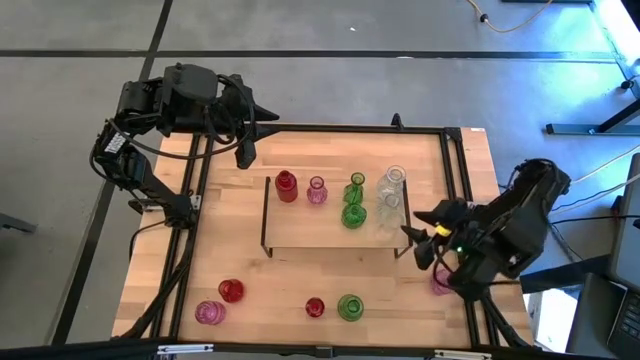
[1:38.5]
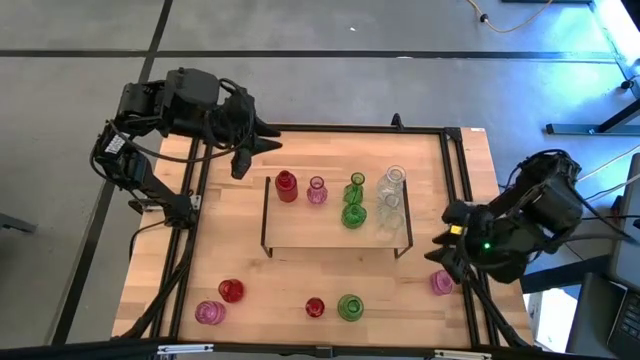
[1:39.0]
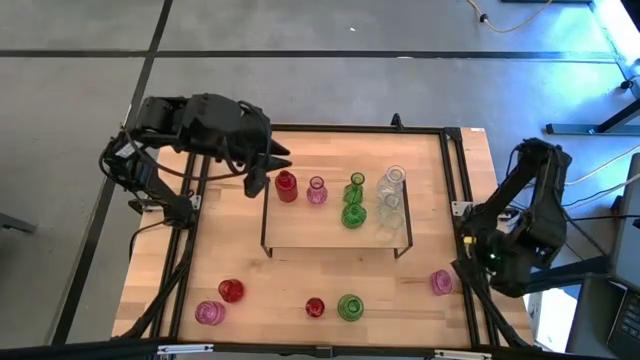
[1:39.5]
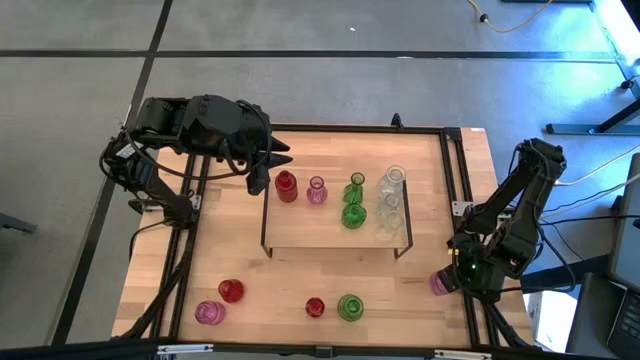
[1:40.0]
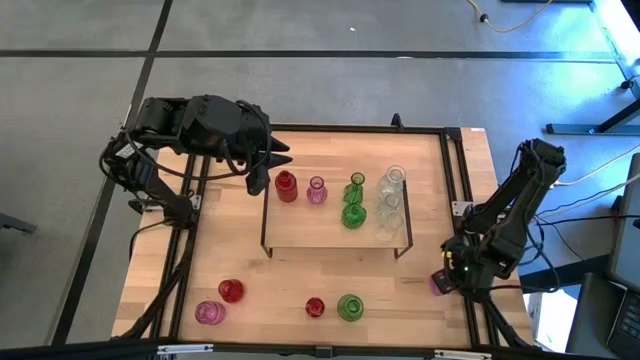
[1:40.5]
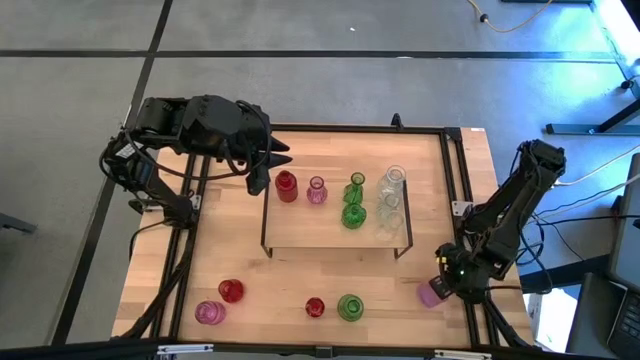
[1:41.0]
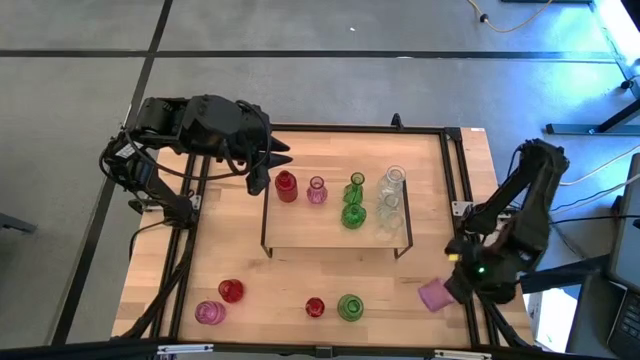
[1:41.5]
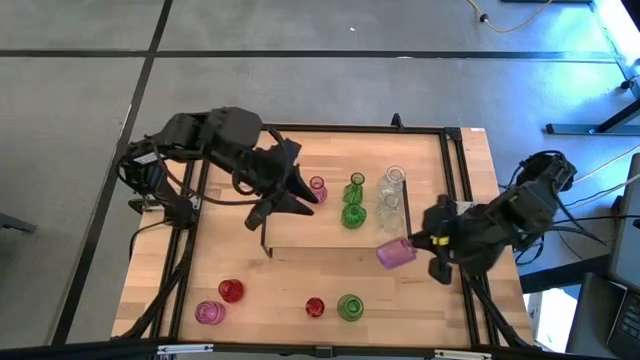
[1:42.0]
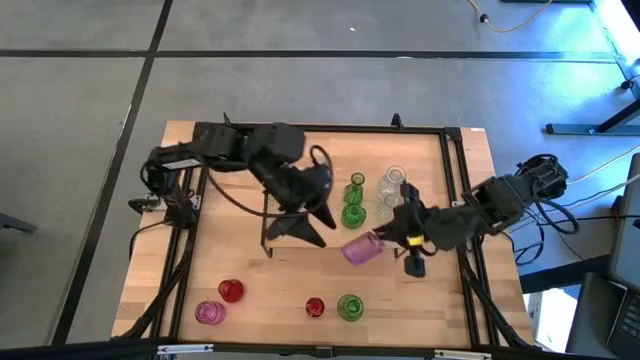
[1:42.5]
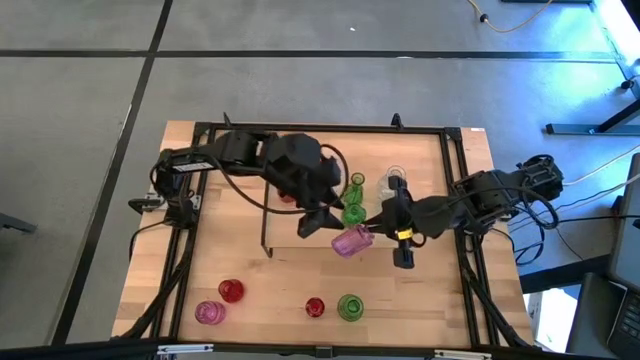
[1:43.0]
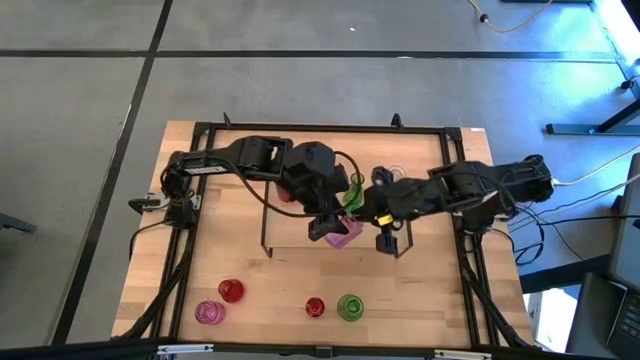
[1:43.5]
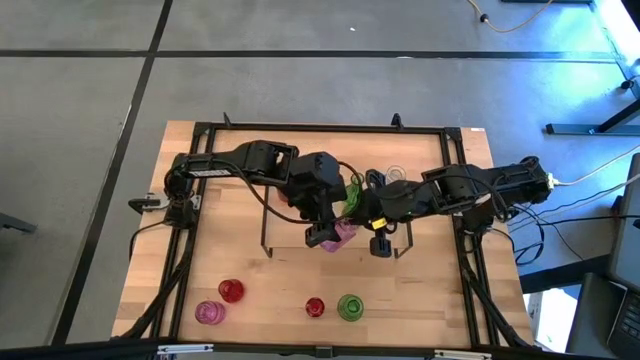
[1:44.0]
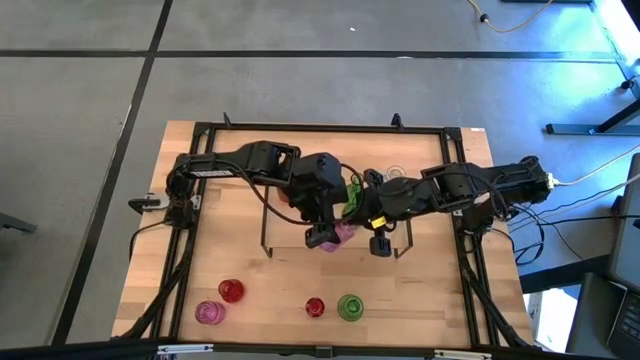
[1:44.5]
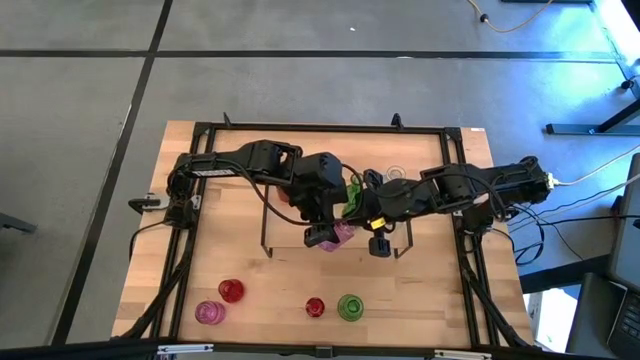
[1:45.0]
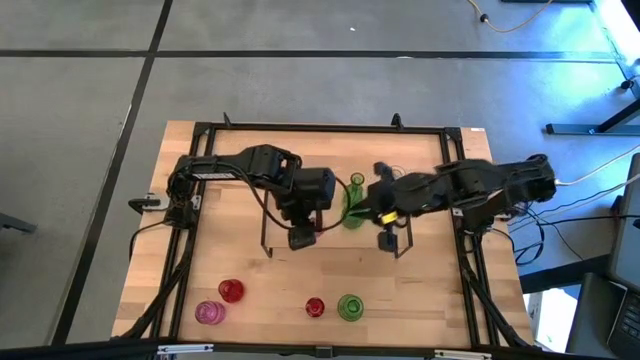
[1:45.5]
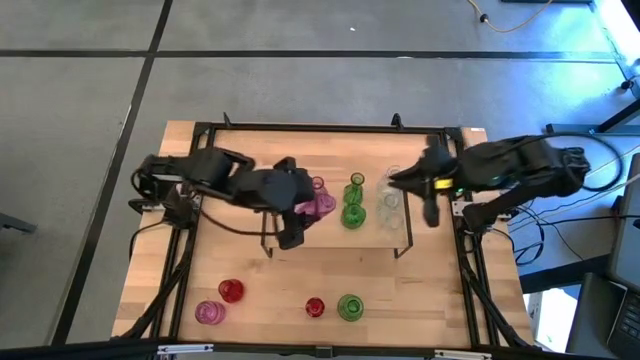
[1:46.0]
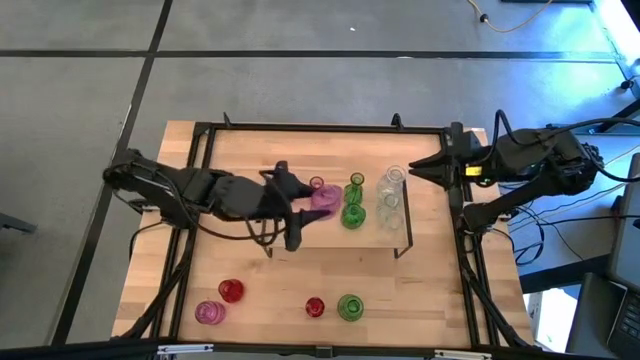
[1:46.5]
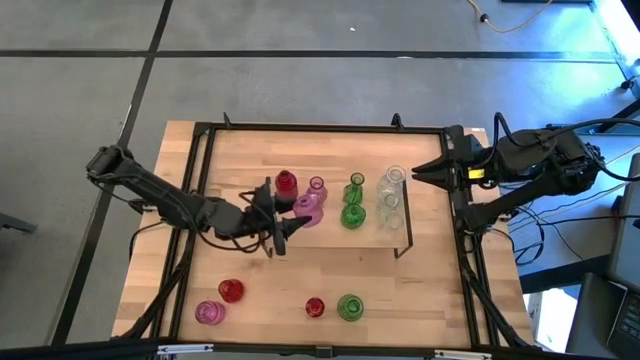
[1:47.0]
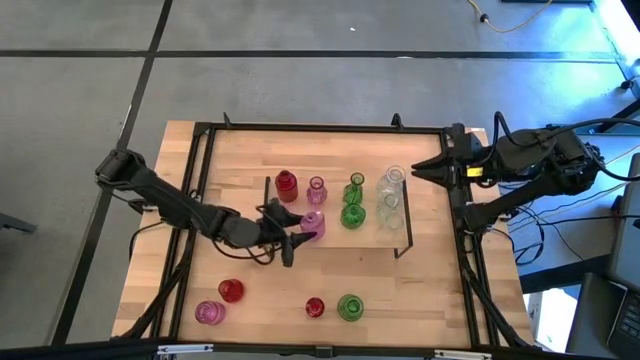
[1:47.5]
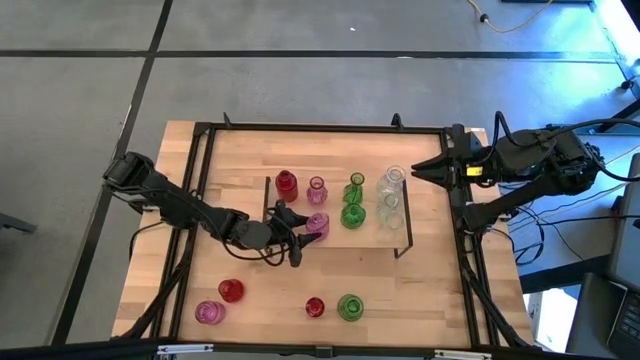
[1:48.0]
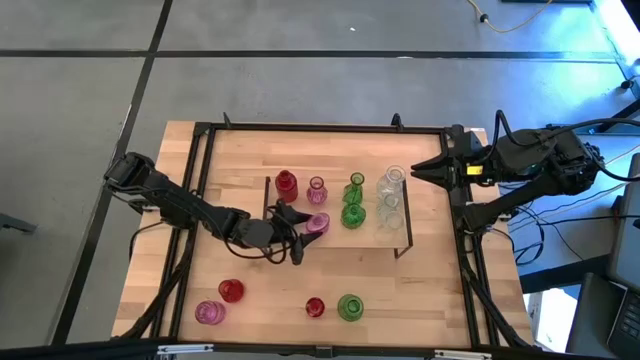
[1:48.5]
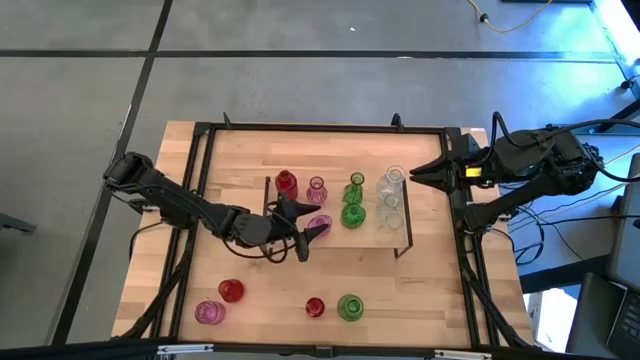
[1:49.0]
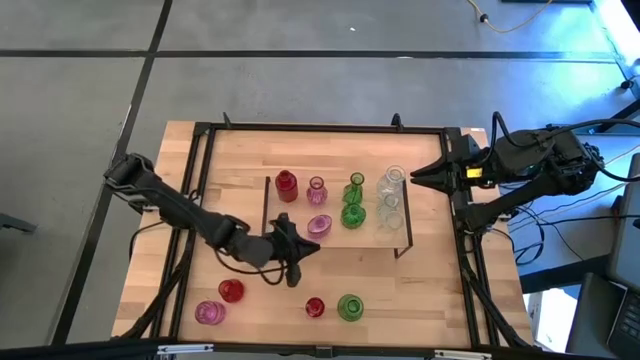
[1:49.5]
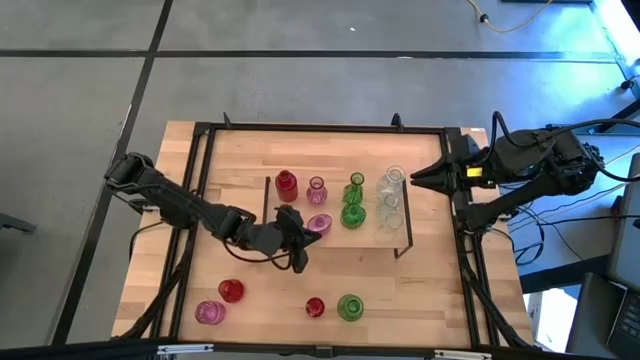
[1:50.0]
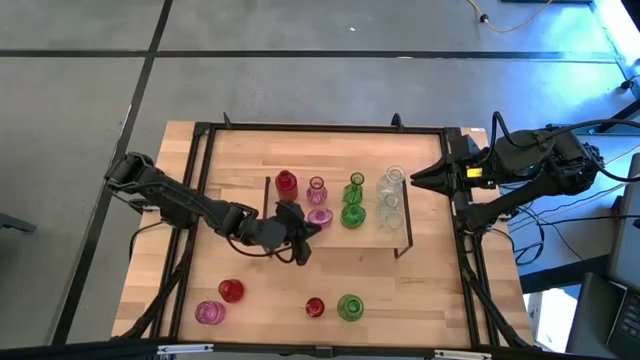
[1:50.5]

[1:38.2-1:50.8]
Task: sort vases onto shelf
Put the top violet vase on the shelf aligned with the other violet vase

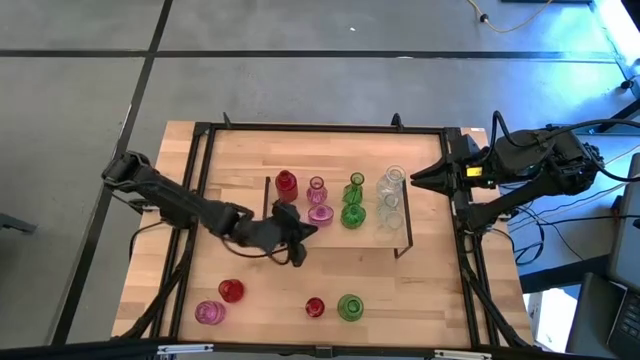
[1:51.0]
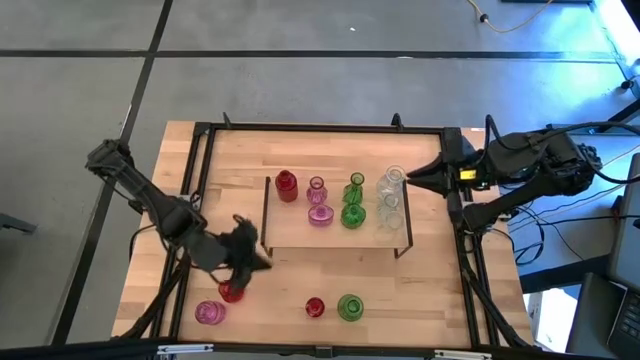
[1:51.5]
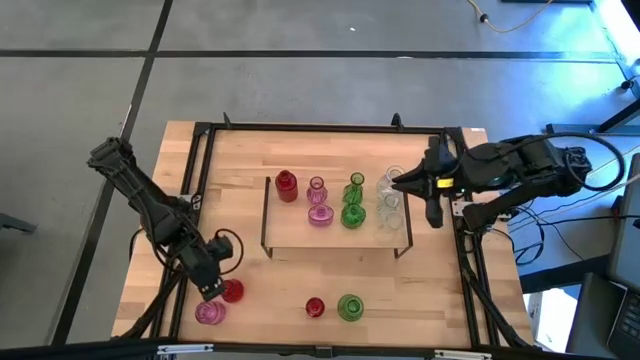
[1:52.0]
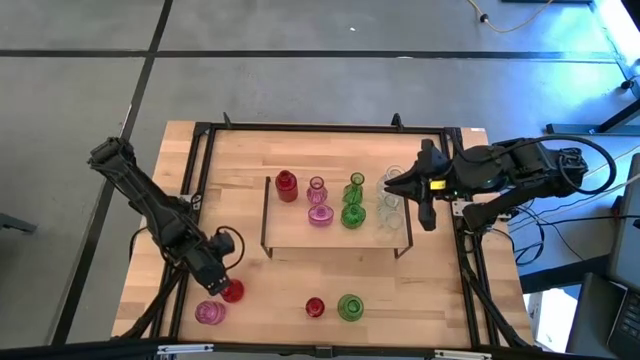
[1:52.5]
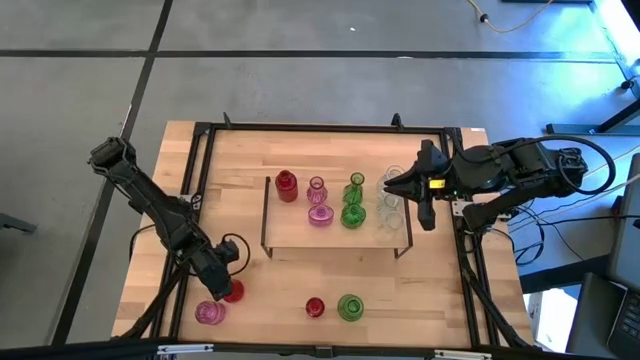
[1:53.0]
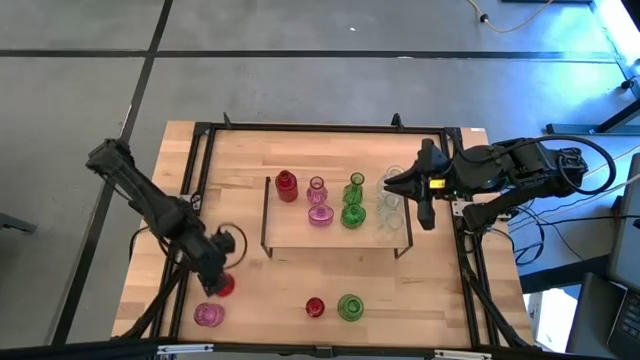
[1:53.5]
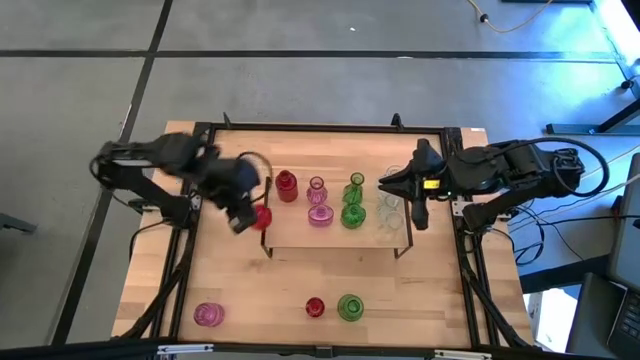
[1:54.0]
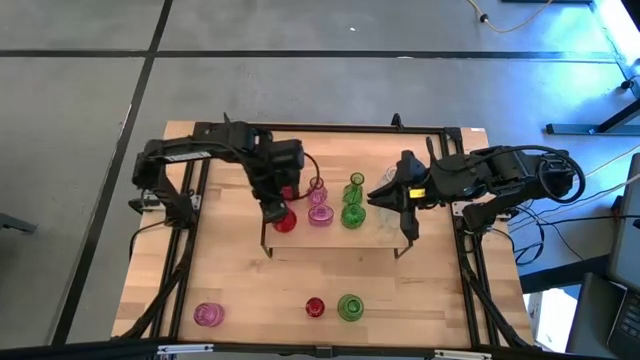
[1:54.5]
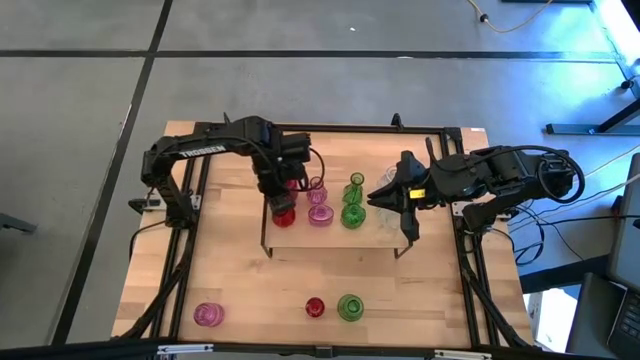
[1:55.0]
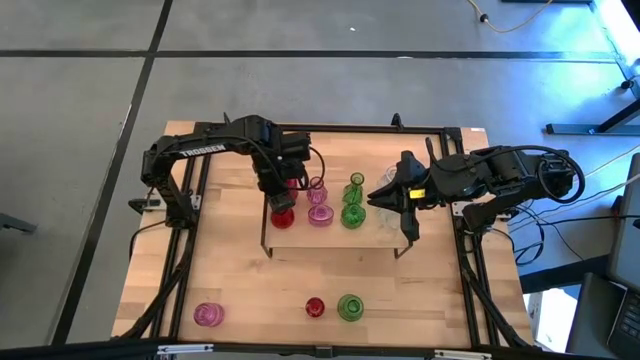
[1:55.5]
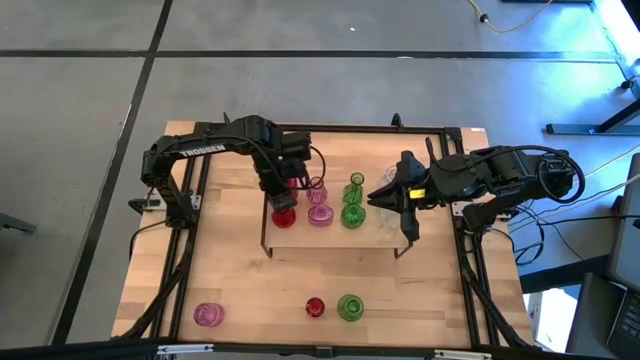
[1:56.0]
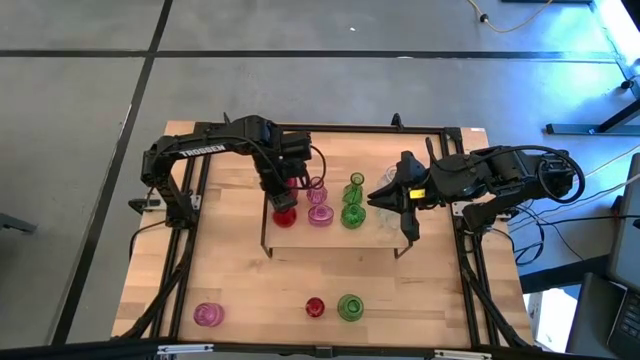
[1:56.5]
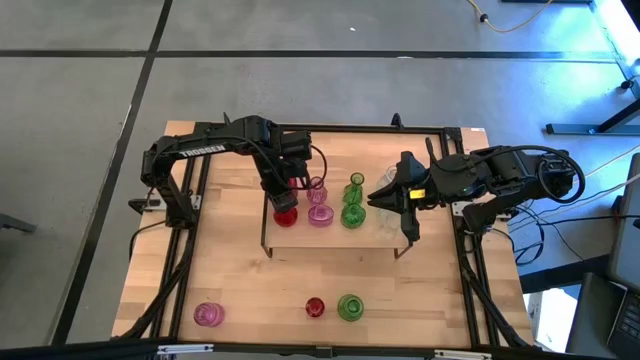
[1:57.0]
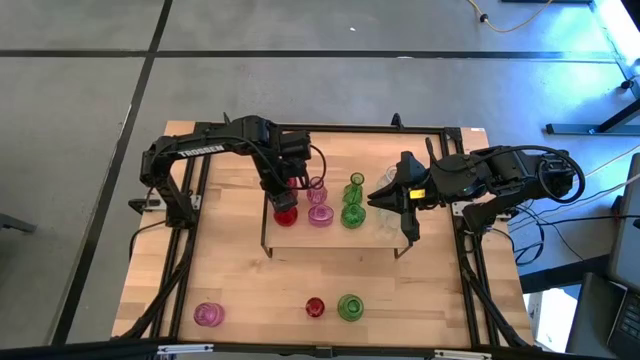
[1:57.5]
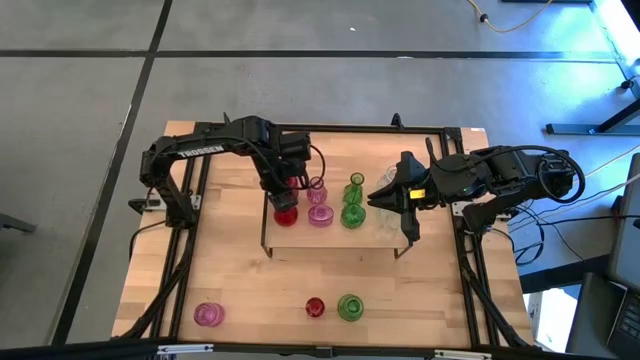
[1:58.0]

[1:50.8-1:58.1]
Put the top red vase on the shelf aligned with the other red vase

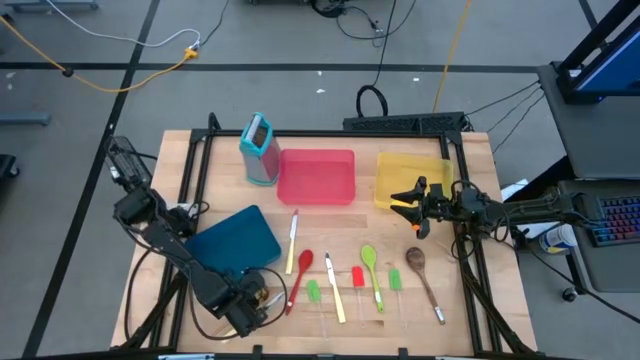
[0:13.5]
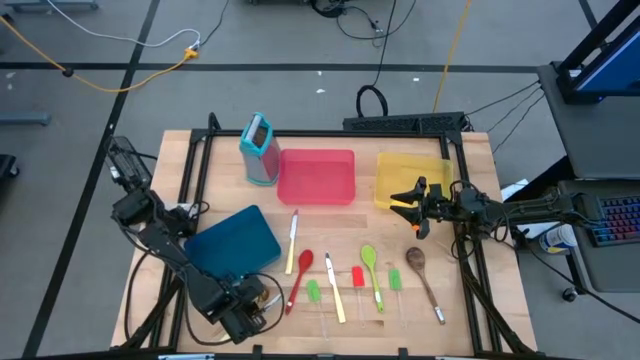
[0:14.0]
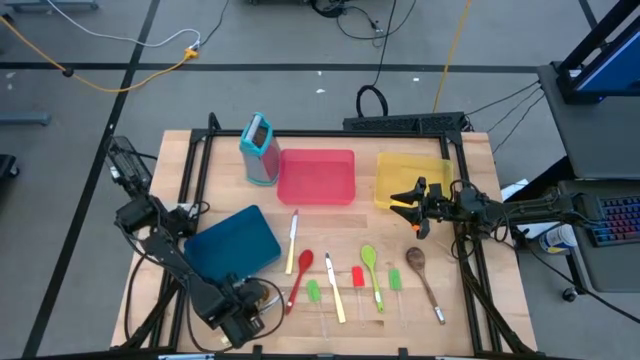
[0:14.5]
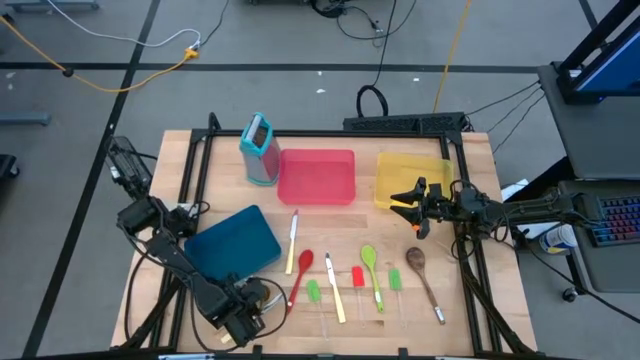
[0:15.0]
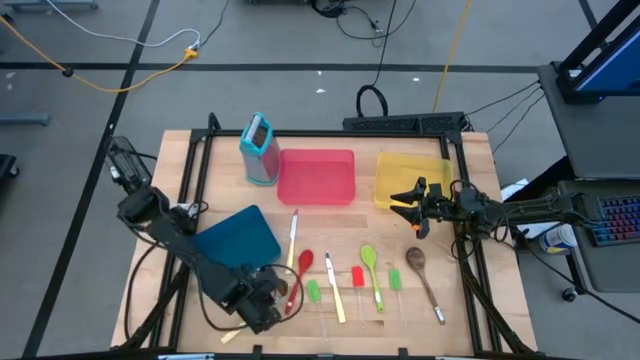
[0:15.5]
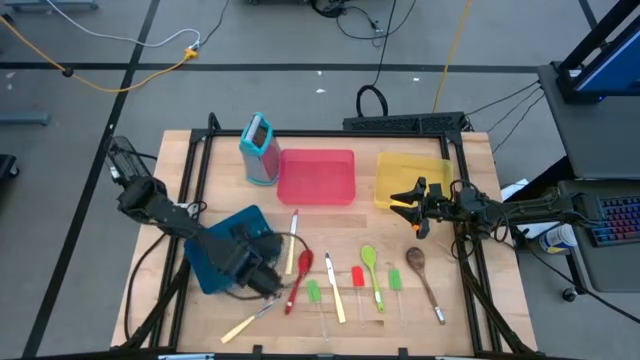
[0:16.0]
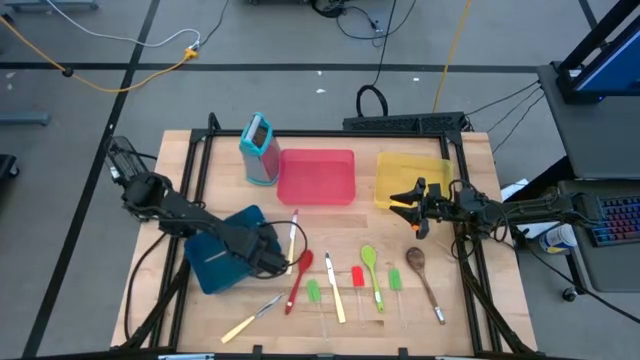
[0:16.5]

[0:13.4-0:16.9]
Task: Pick & Place Kitchen Items
Put the gold spoon into the blue bin
